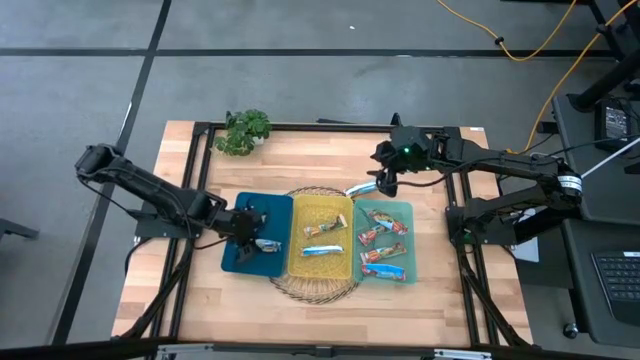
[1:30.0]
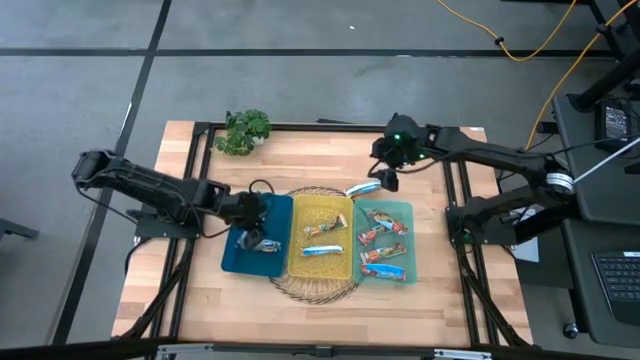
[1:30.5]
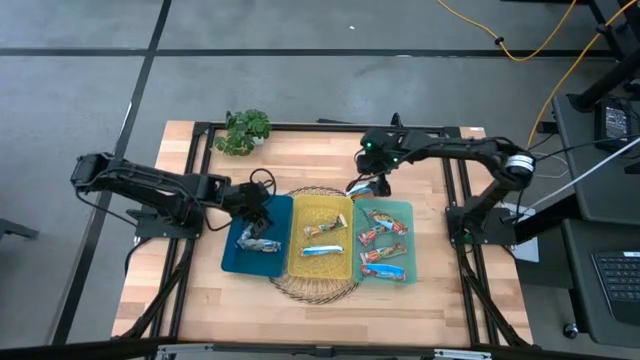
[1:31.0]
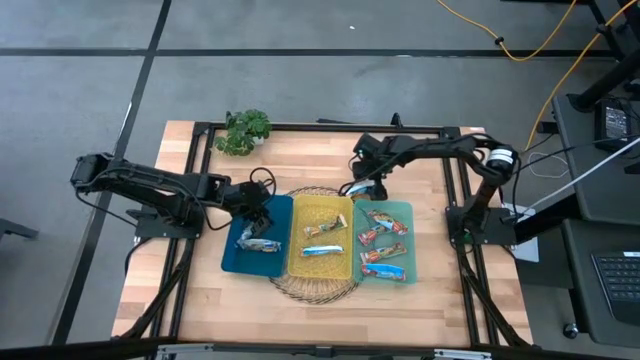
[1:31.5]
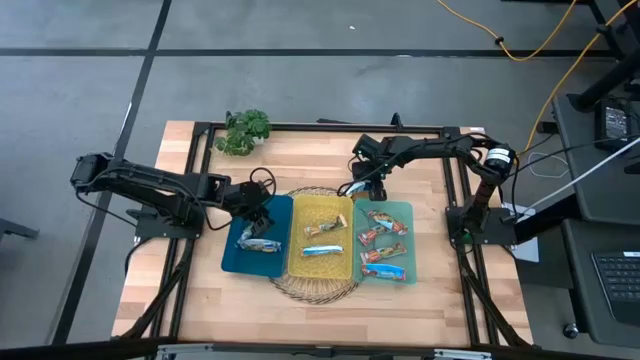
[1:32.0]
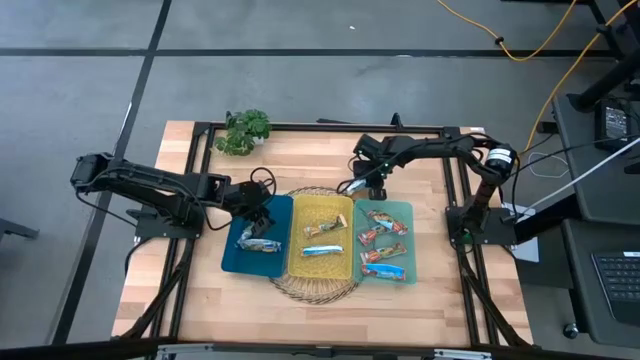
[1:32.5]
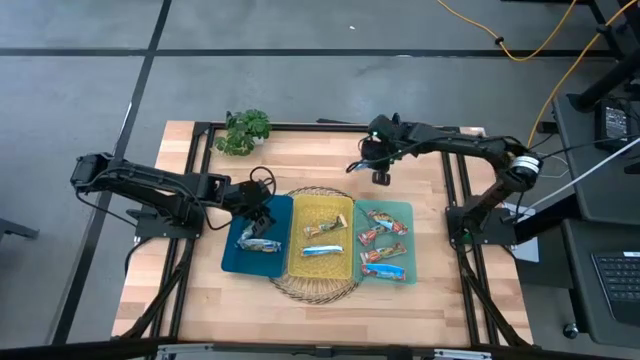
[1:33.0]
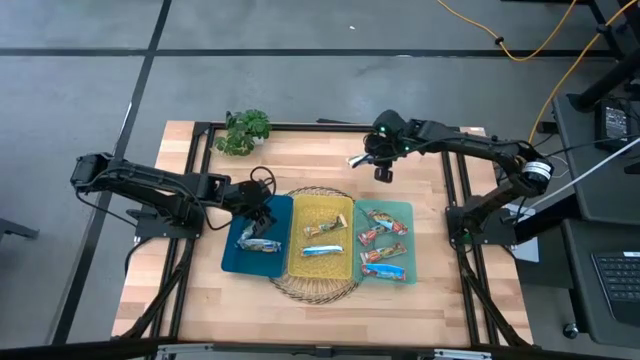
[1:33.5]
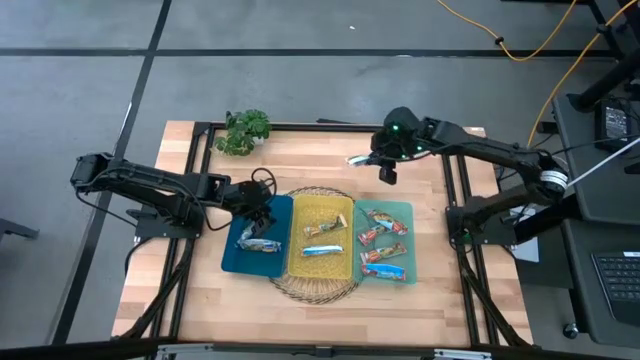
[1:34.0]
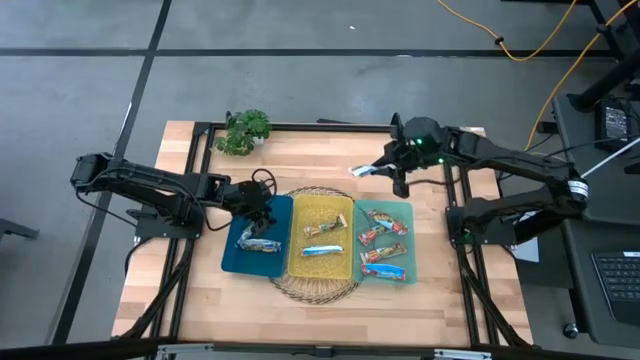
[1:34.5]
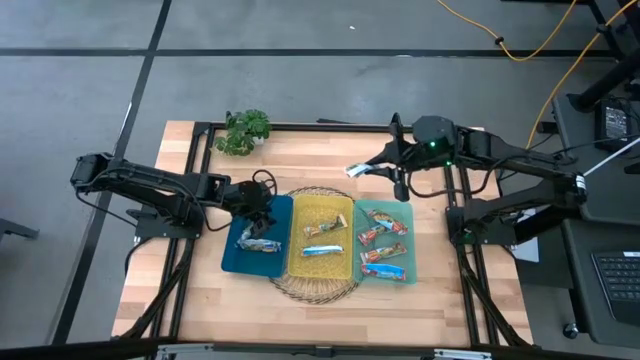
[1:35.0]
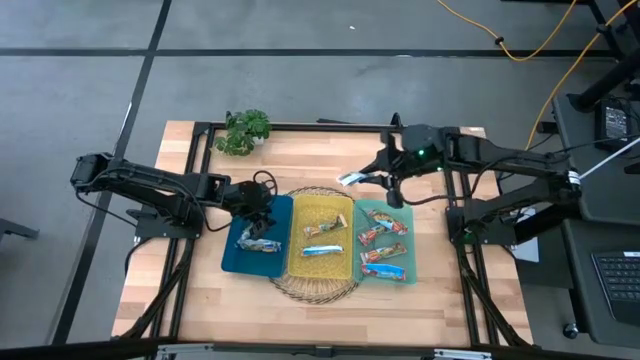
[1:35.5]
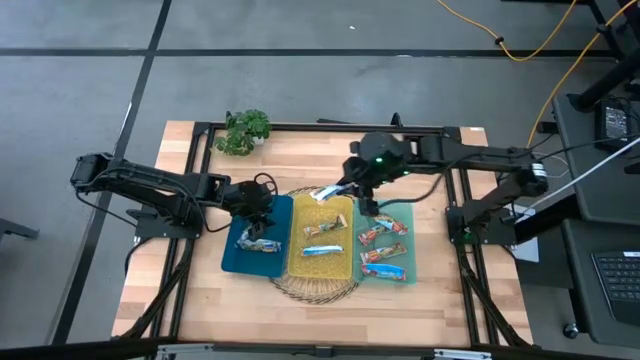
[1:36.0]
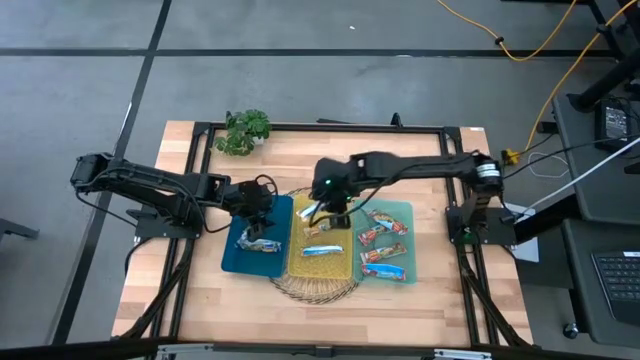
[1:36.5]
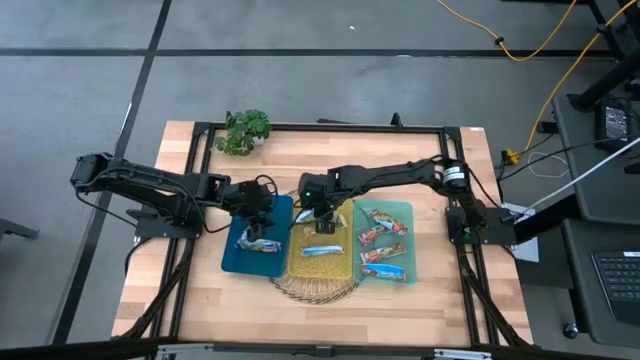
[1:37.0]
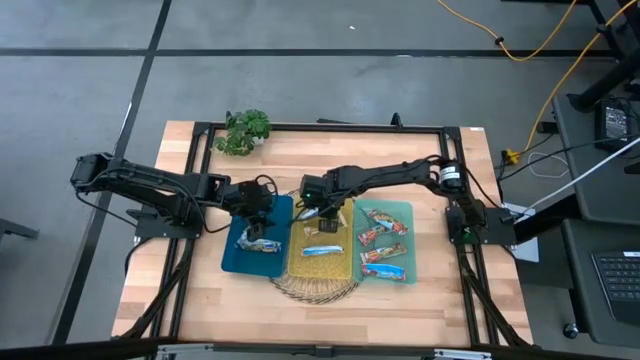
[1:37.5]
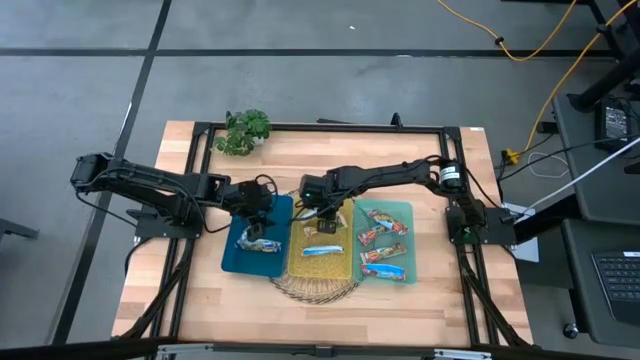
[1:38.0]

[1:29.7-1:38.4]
Task: Pick and place Granola Bars by type
Put the yellow granola bar into the yellow bin

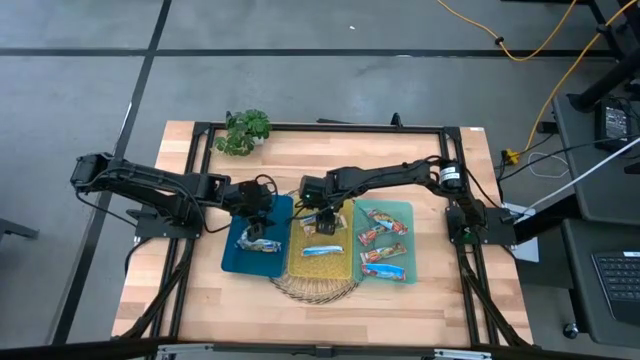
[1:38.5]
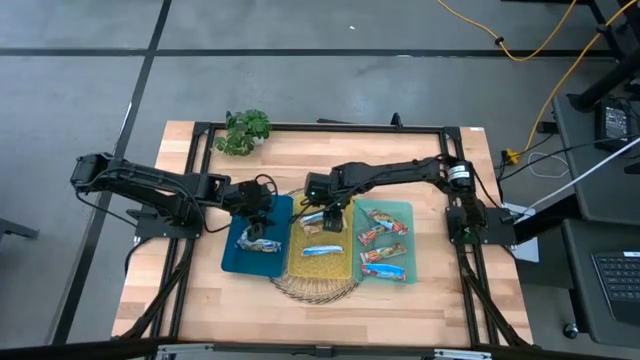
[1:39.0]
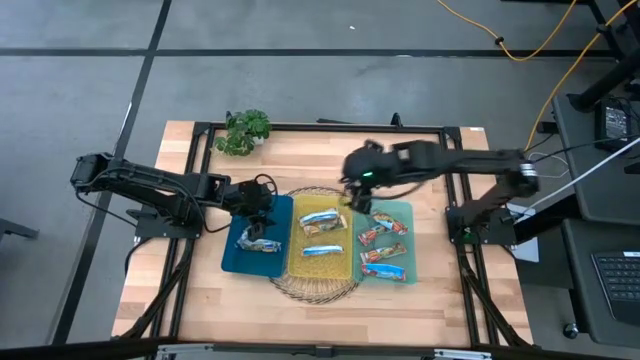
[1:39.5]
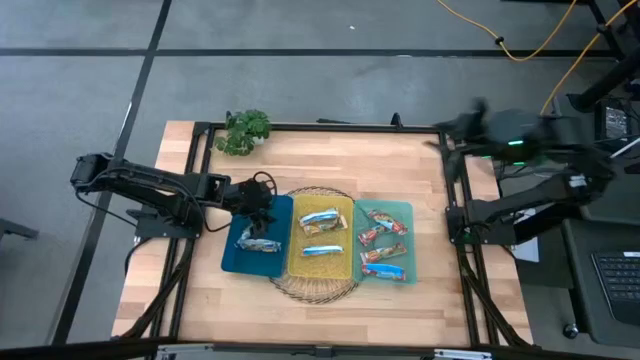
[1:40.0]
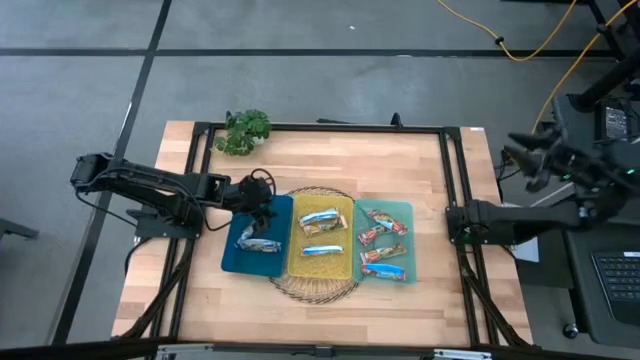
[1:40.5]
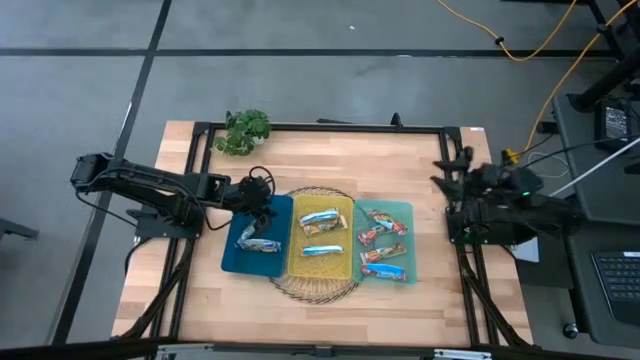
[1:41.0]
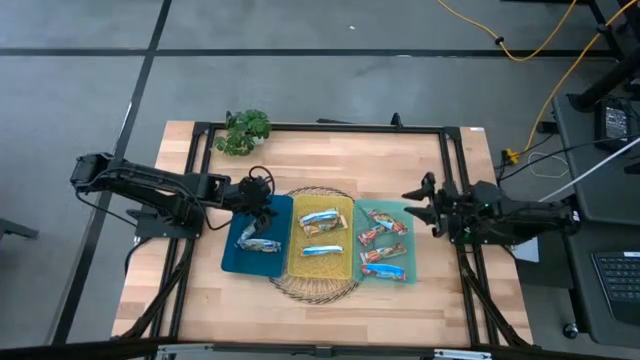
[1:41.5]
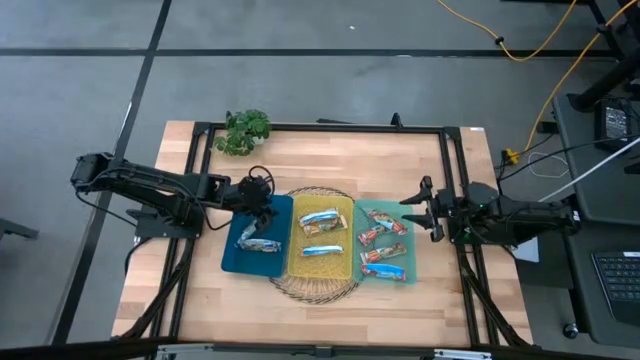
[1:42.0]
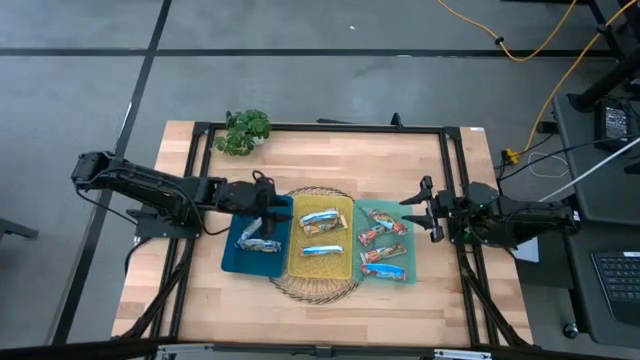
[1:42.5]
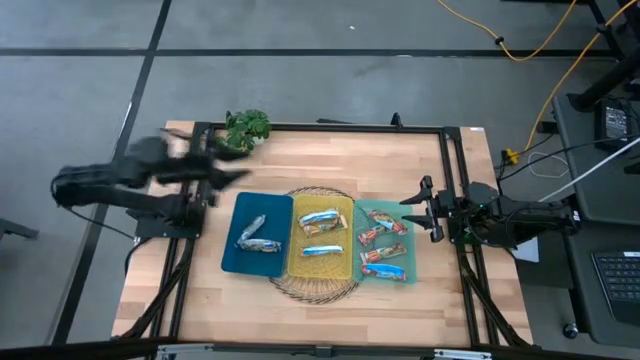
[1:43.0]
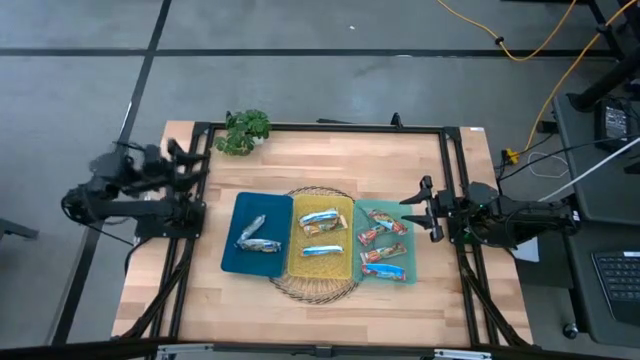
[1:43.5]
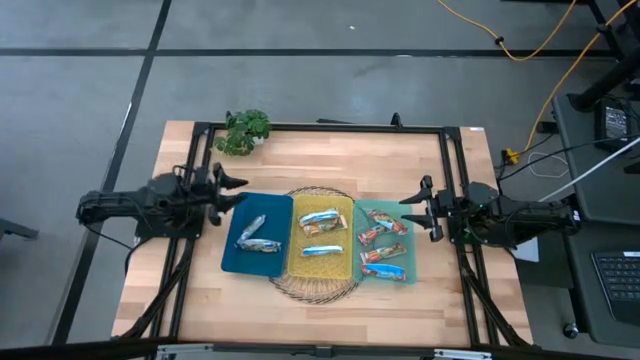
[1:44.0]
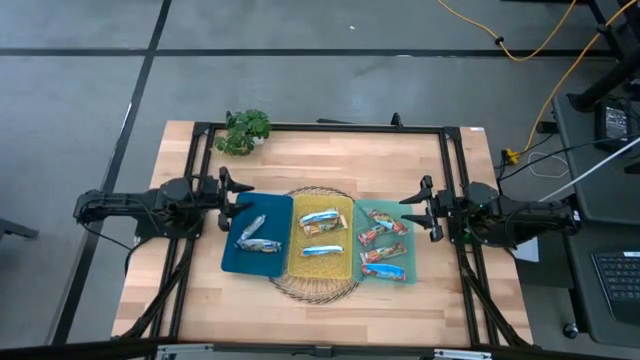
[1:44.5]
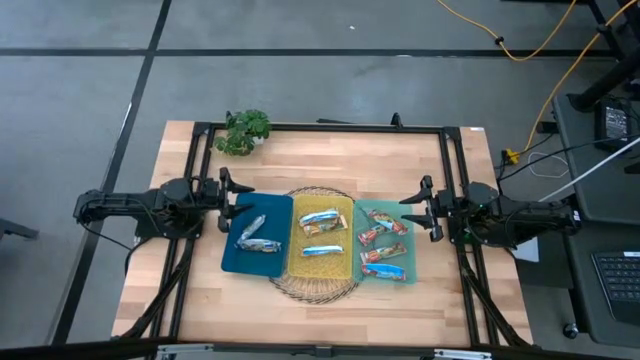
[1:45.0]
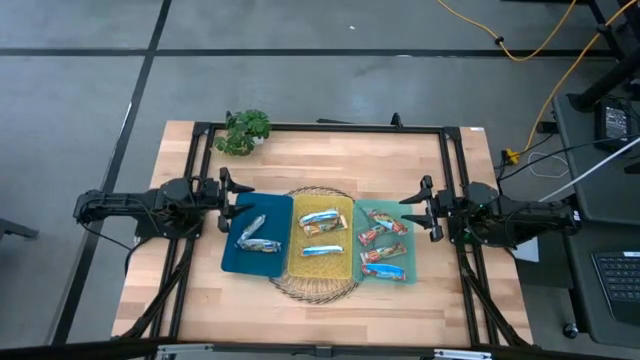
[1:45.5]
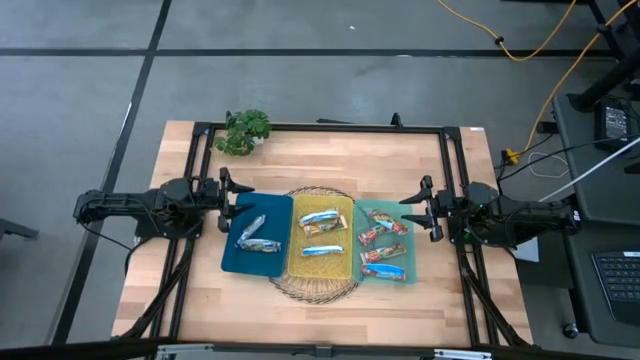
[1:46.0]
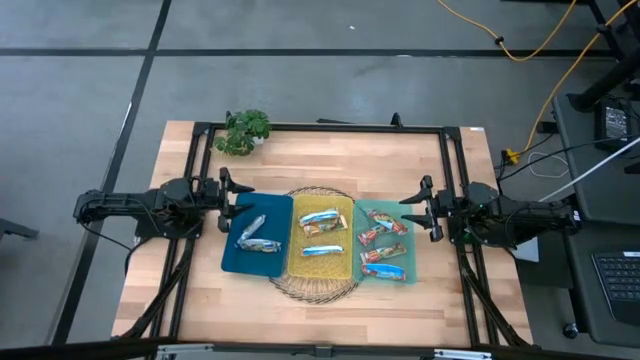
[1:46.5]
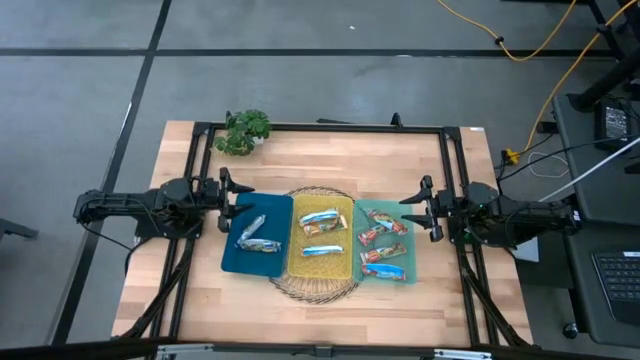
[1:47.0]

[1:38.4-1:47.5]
Return to Home Position

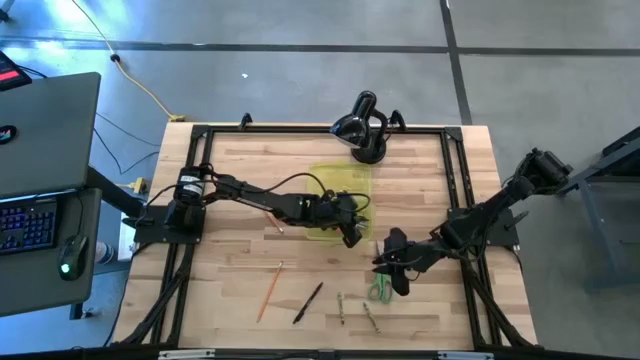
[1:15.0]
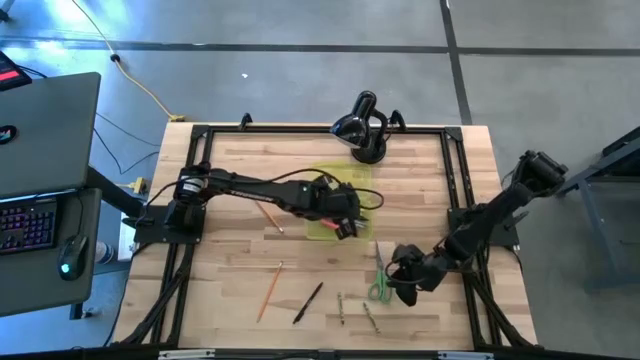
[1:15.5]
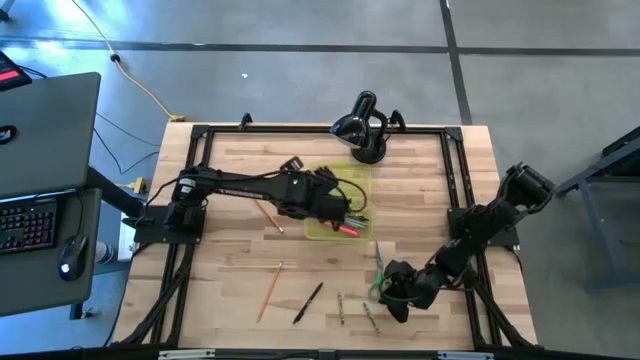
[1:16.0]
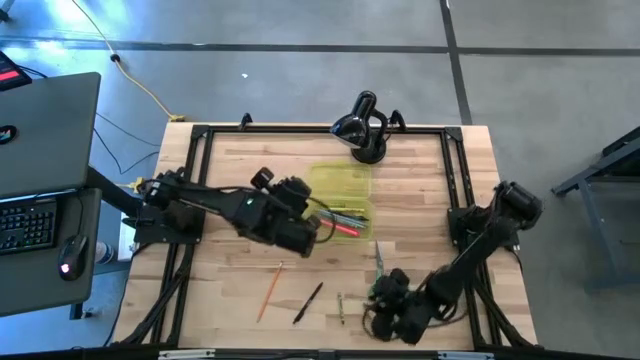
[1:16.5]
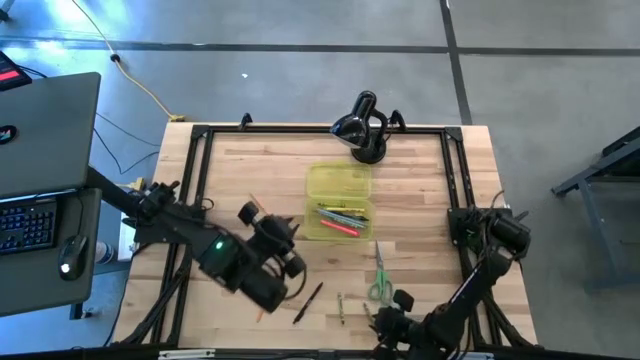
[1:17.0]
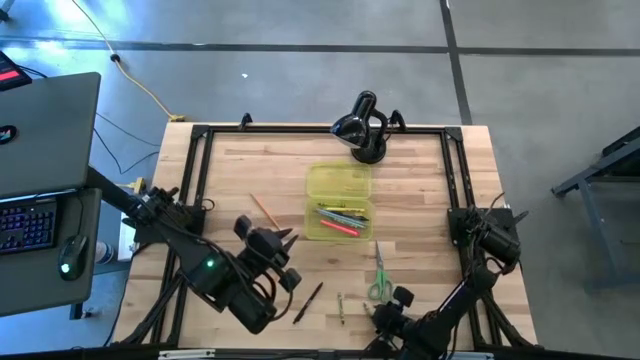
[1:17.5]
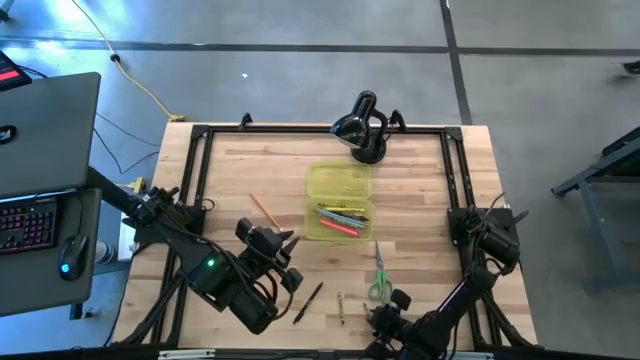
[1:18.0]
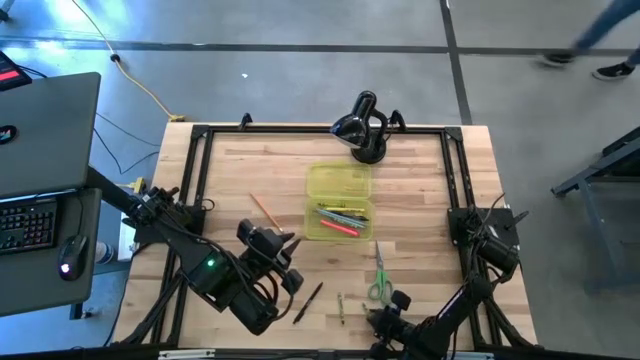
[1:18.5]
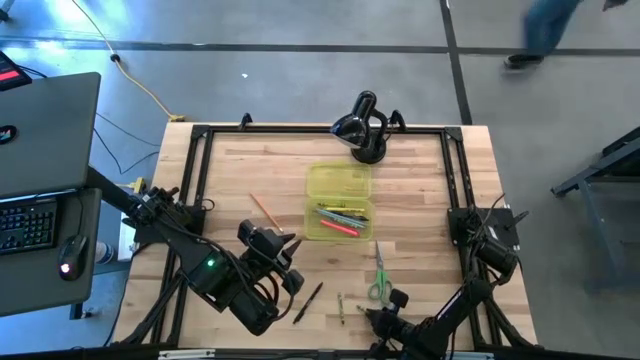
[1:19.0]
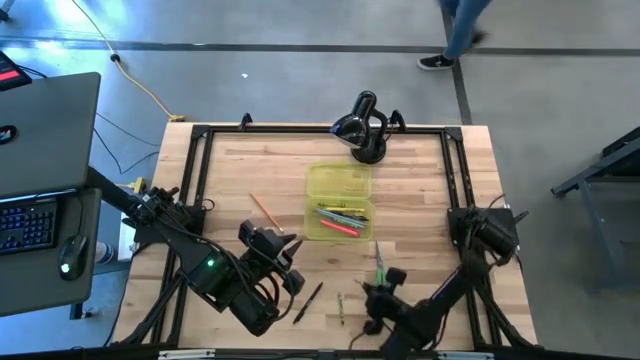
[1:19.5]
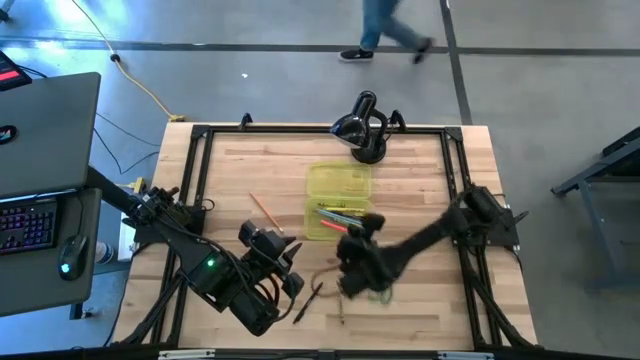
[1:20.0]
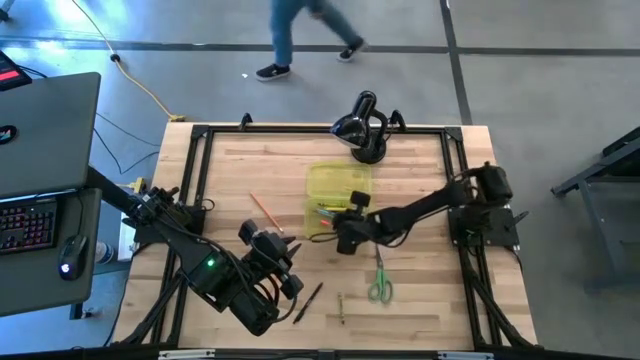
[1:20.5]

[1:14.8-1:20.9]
Task: Pick & place school supplies into a supply box
Put the green crayons into the yellow school supply box
